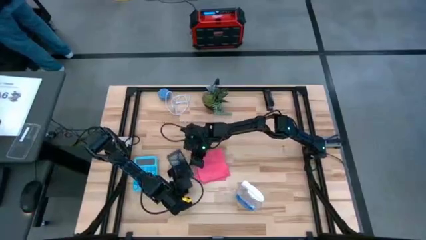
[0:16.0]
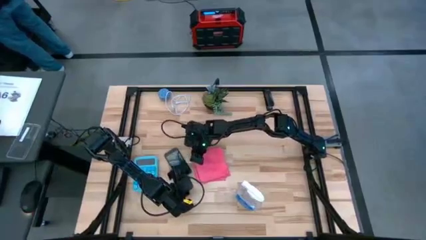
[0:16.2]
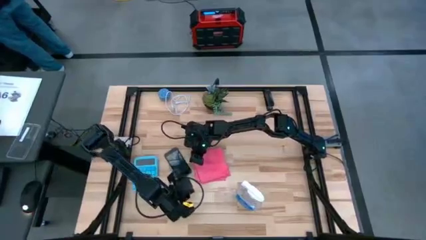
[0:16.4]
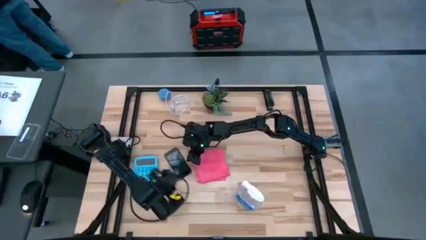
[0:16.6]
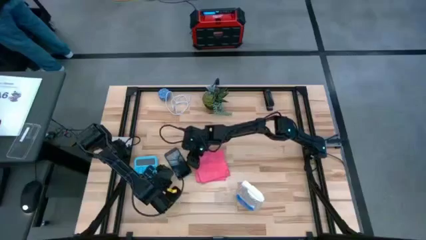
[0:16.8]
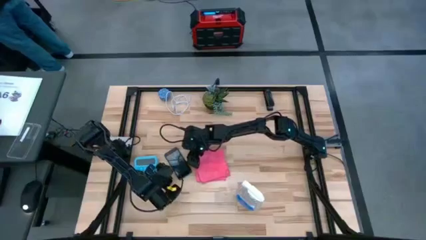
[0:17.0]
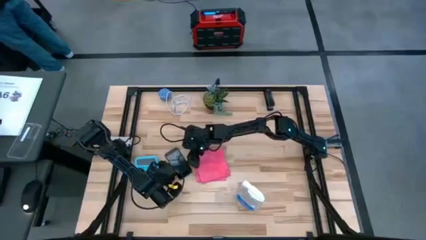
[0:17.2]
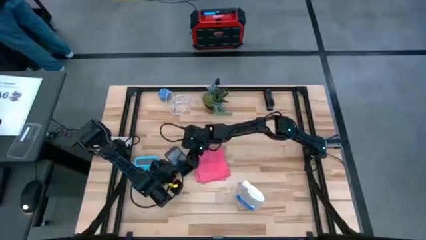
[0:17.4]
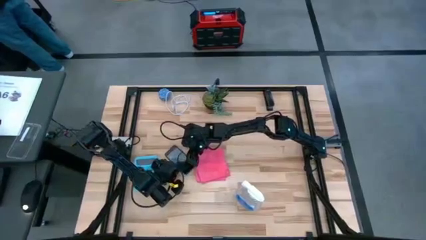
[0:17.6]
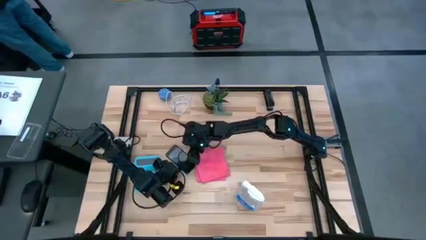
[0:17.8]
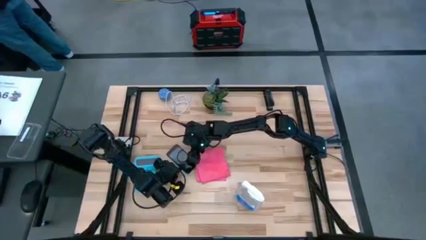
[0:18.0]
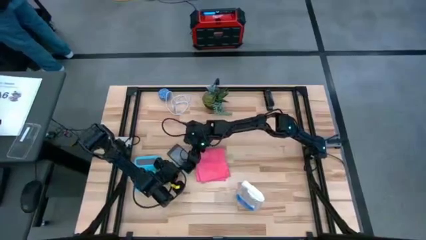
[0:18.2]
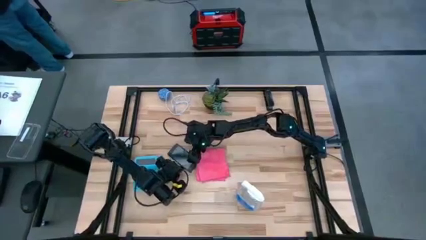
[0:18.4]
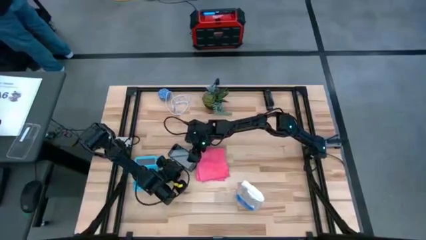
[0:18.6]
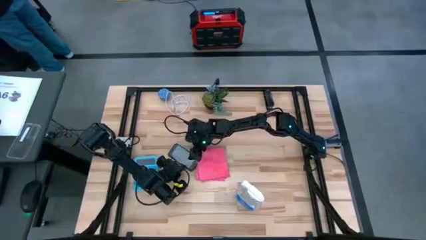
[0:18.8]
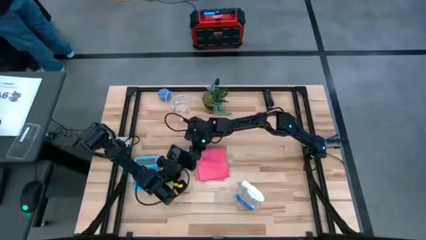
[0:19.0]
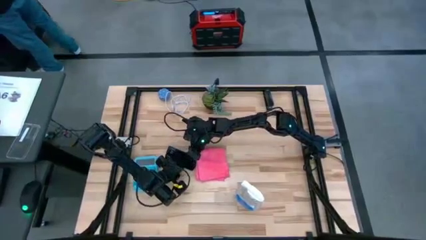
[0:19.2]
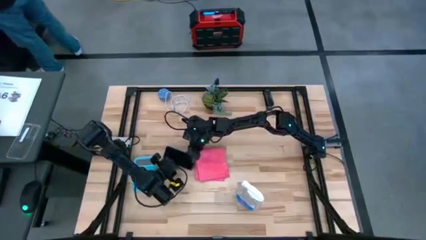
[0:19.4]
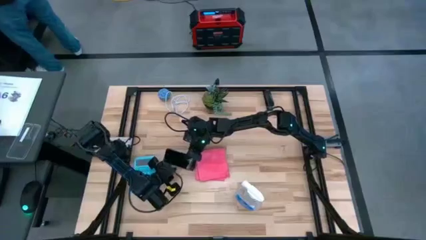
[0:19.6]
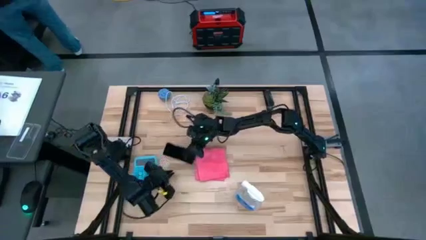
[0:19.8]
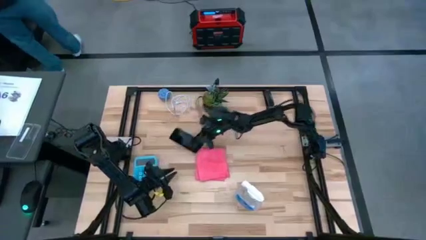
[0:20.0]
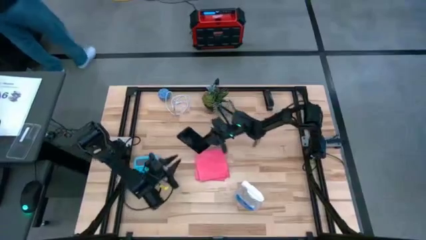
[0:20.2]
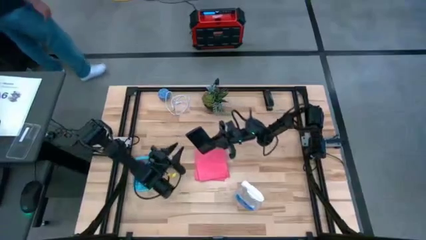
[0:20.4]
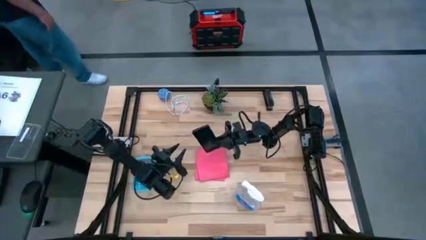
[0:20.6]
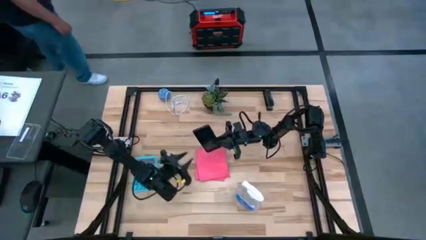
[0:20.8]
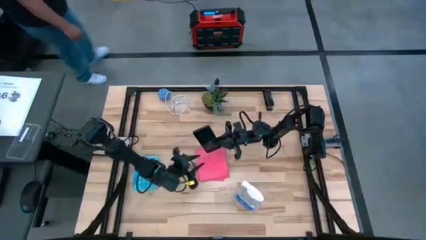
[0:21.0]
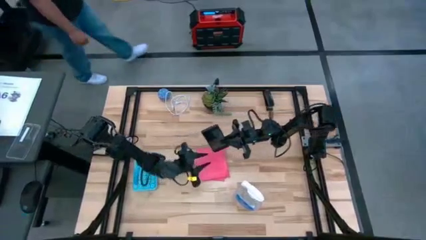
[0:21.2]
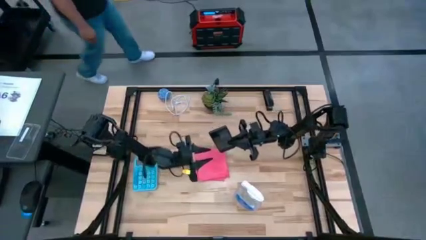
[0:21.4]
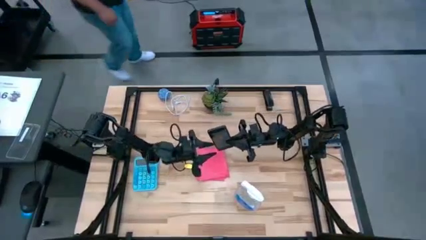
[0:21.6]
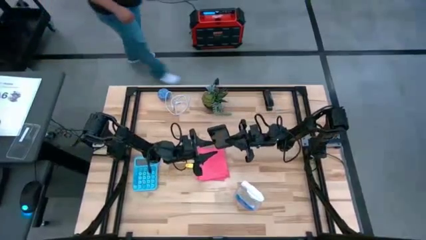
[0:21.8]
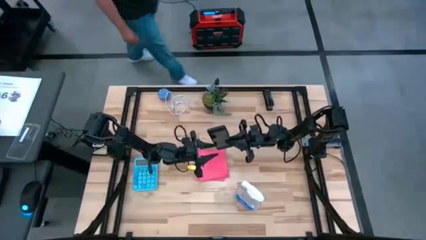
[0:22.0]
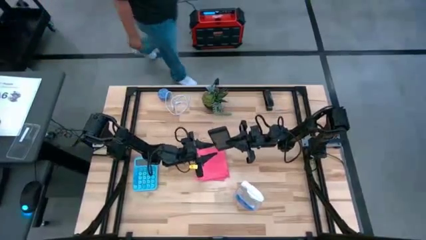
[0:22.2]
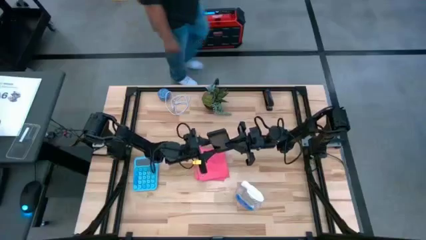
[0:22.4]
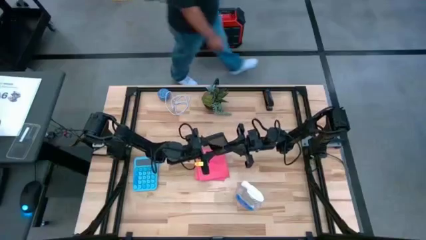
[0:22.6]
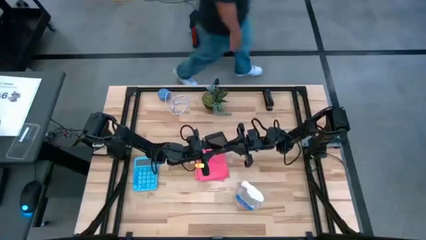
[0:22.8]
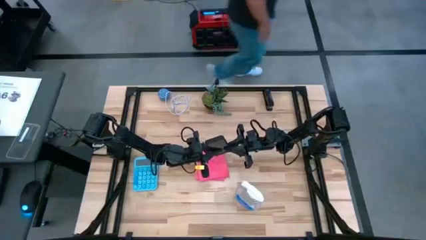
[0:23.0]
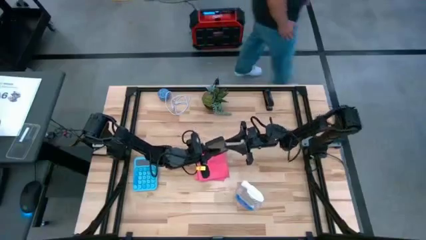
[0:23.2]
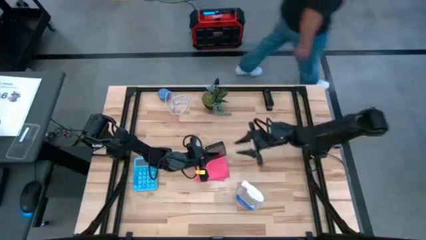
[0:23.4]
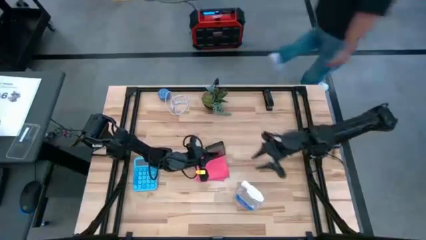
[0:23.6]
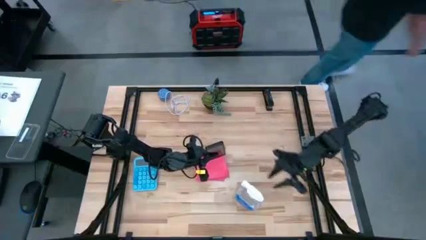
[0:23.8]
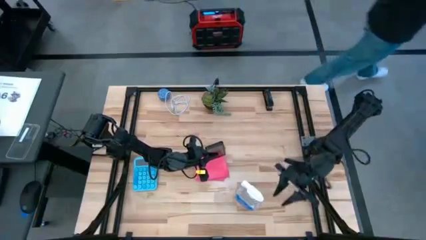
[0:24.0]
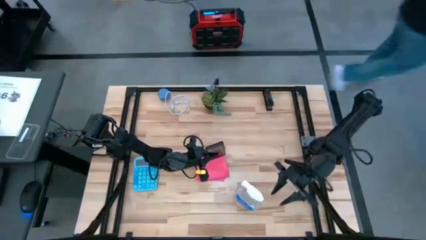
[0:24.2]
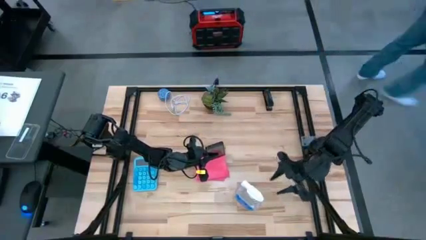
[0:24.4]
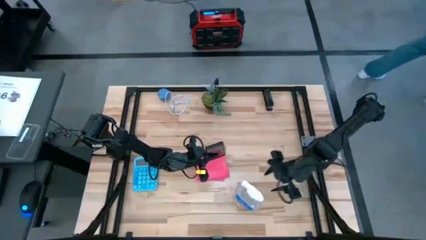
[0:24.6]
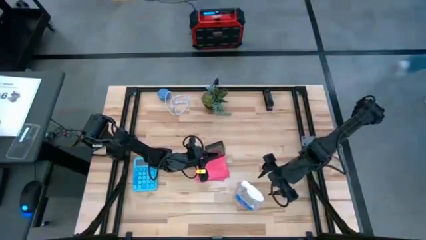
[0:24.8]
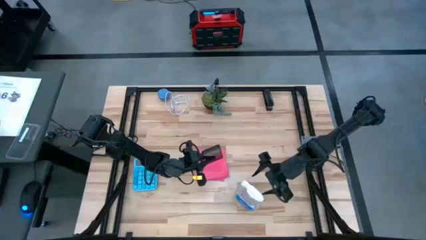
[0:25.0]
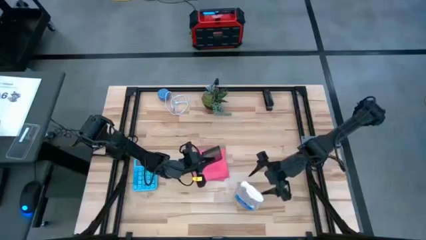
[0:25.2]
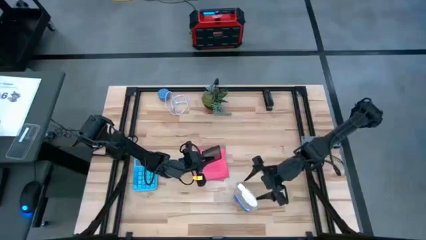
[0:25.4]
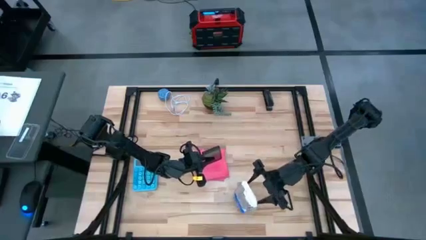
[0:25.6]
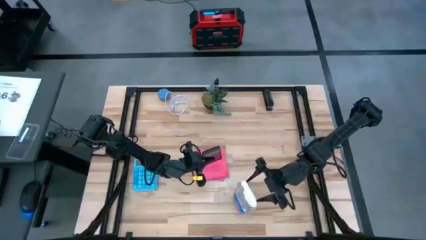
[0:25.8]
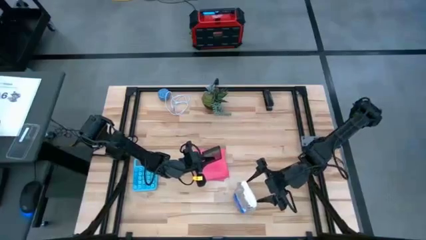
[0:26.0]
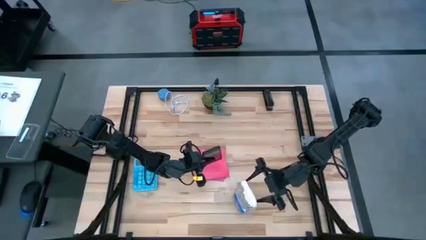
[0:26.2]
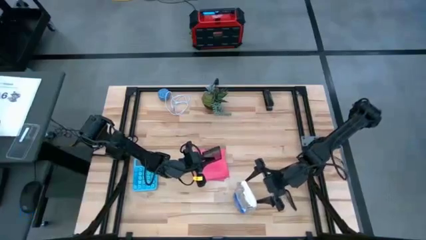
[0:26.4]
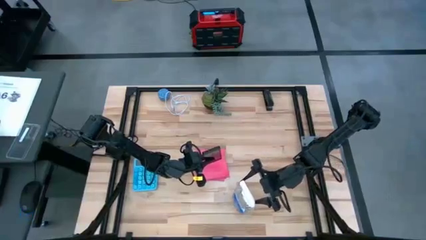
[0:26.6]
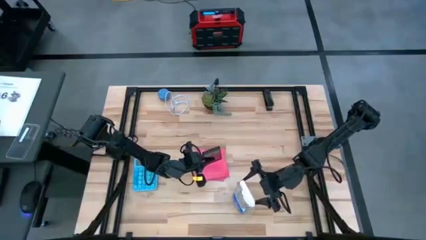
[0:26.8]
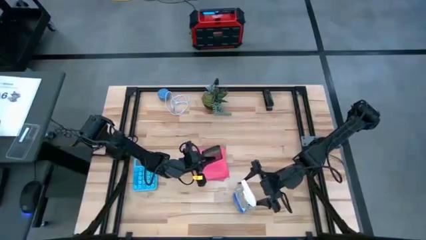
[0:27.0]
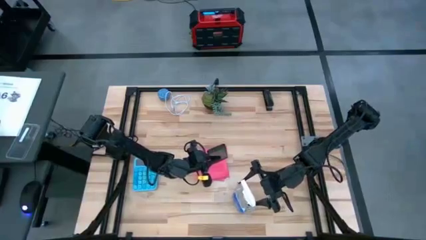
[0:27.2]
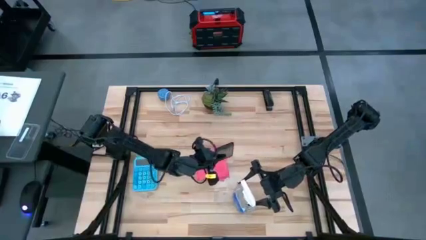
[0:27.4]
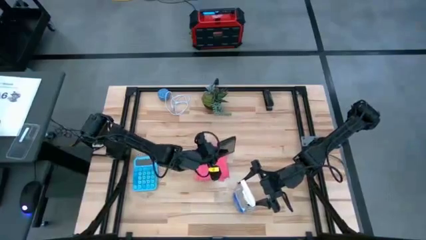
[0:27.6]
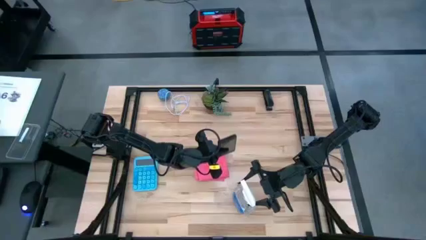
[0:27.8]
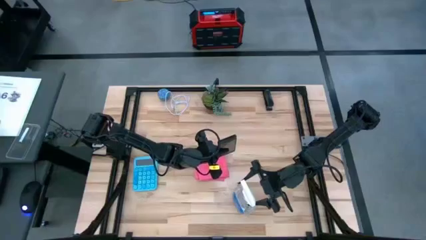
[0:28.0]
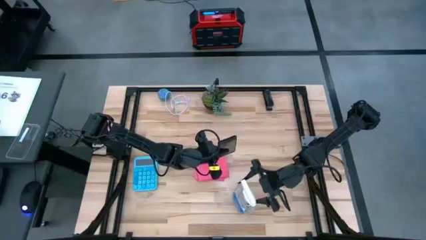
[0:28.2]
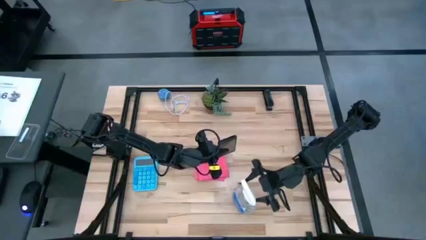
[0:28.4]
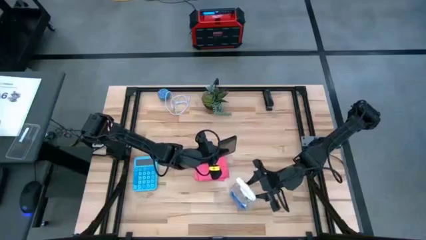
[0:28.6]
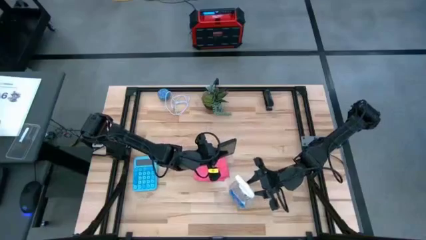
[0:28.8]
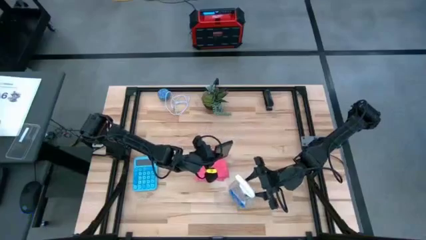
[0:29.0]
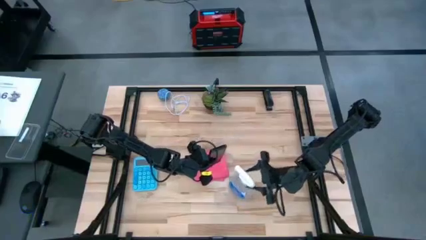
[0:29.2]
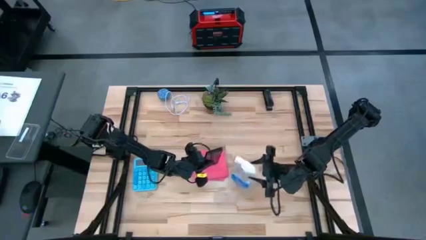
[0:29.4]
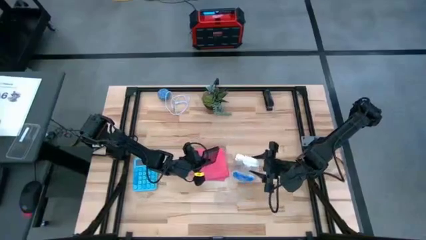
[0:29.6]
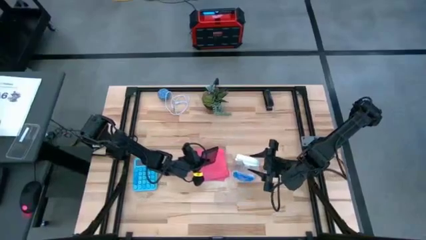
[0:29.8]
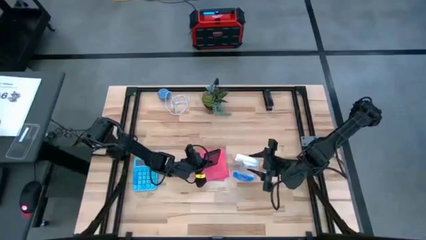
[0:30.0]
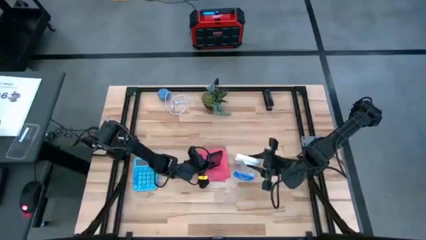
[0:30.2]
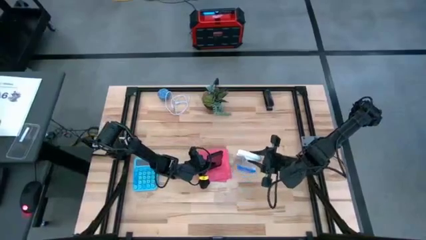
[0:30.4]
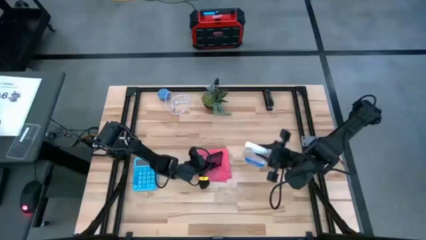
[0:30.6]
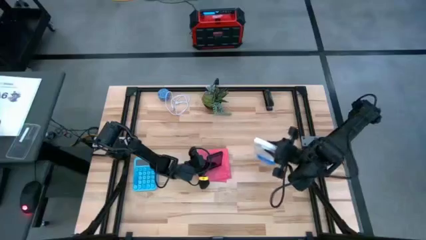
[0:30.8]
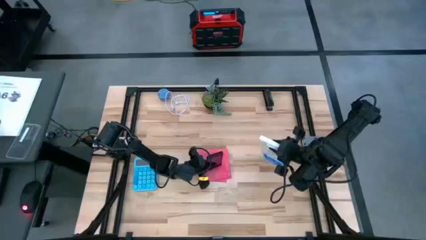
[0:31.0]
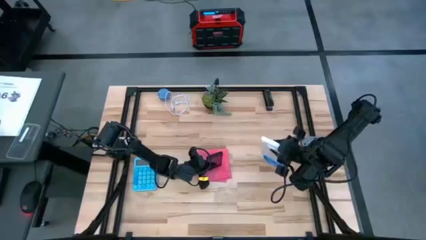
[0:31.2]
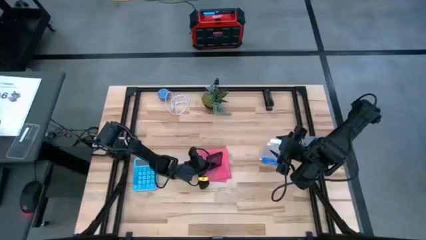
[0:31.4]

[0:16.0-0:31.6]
Task: Apply microfiber cloth
Spray the front of the cellphone using the spray bottle

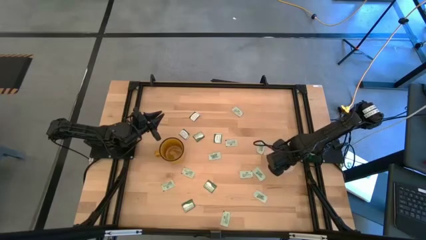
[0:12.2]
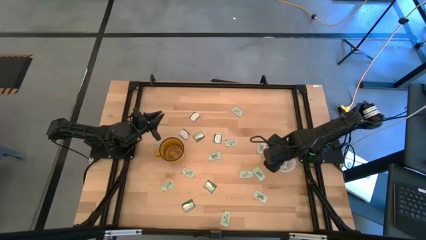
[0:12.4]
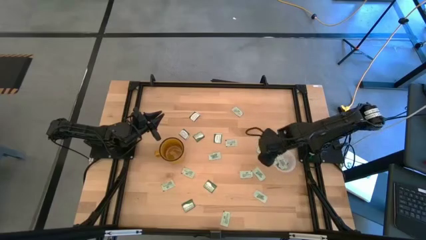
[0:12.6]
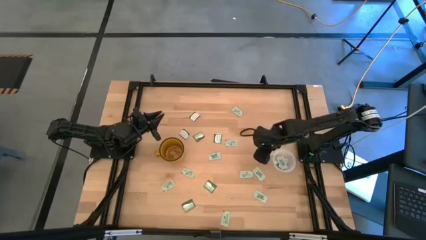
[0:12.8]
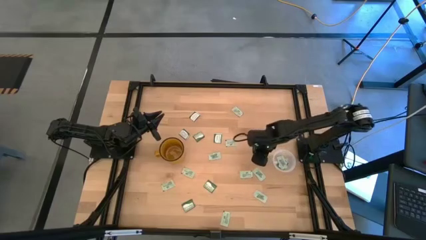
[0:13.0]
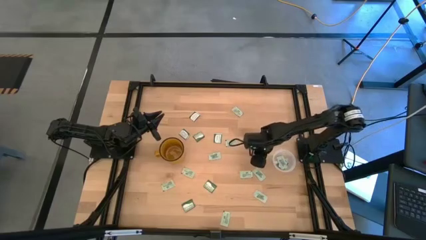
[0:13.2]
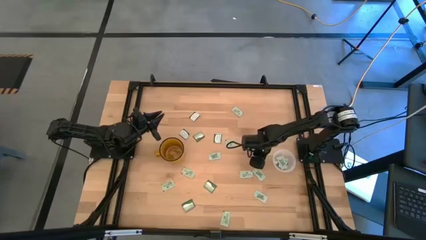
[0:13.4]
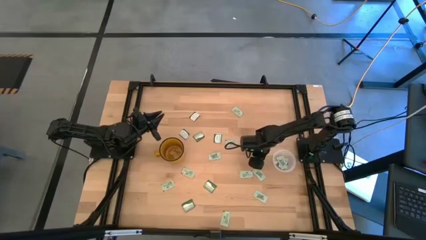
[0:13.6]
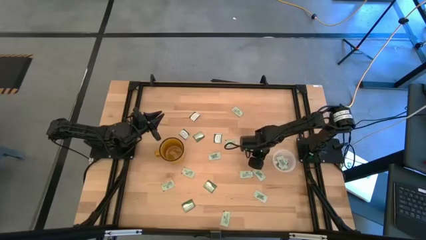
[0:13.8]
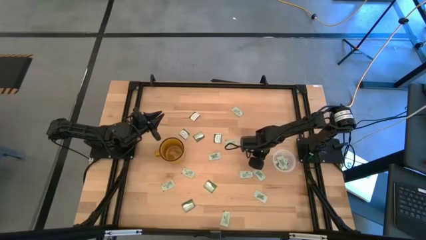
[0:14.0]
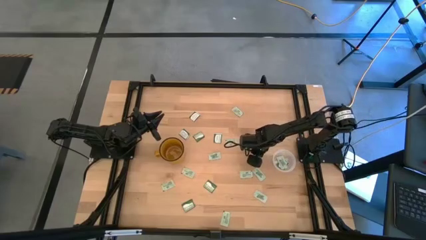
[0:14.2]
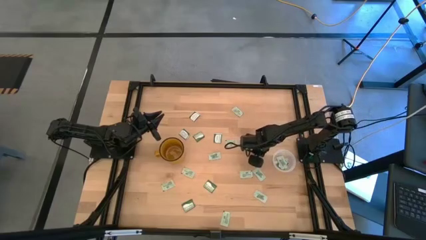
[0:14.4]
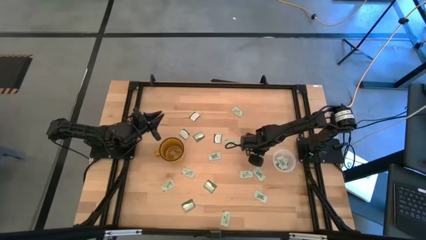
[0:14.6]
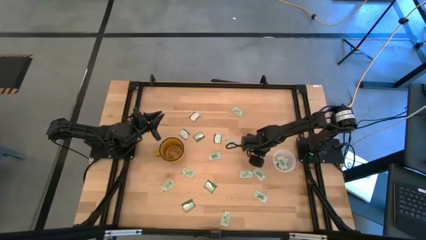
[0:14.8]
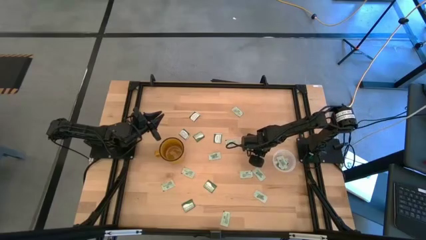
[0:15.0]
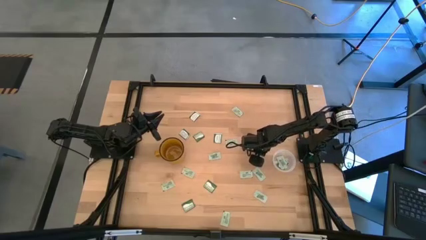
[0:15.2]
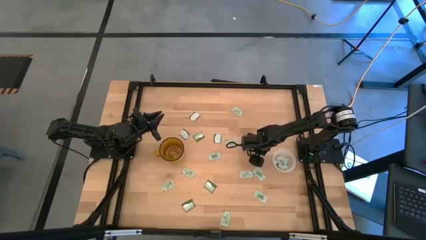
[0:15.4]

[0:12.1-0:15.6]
Task: Pick and place Stevia / Truvia into bins
Put the green stevia packet into the transparent container
